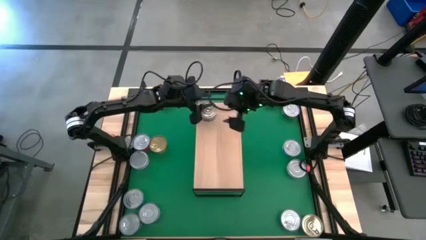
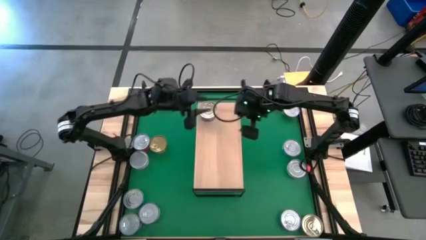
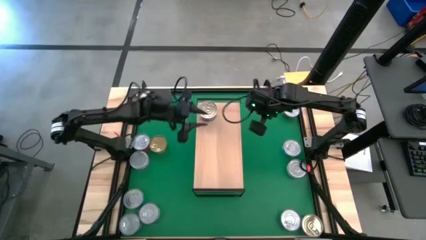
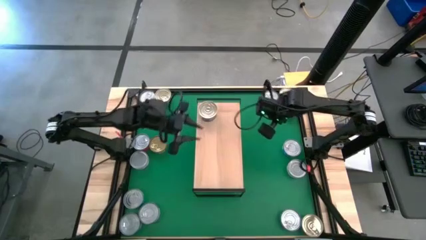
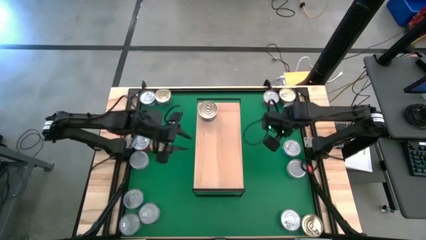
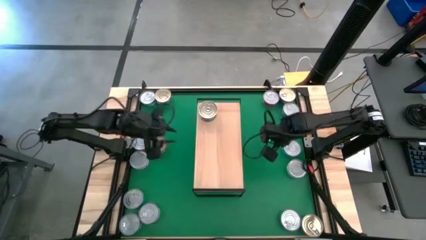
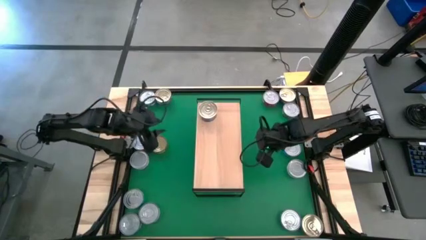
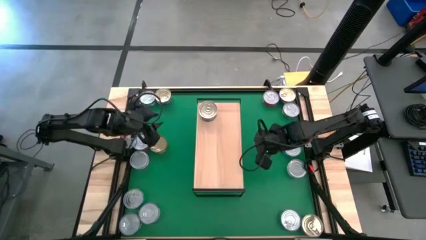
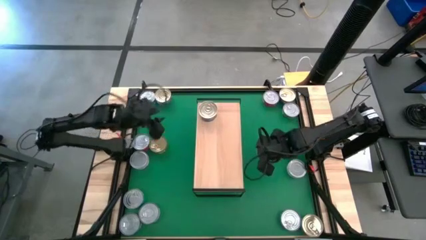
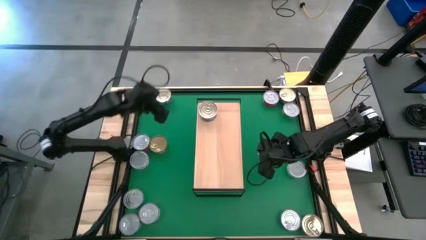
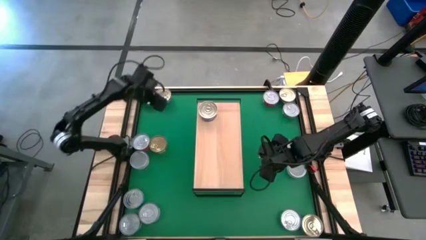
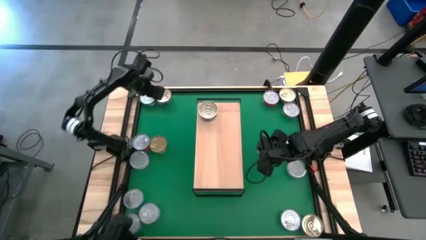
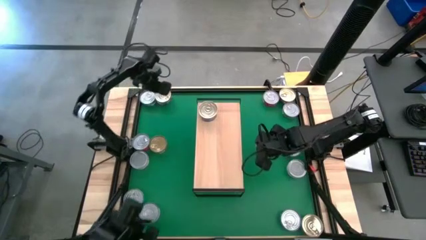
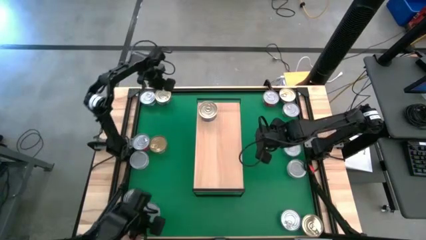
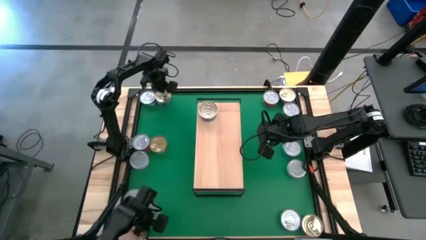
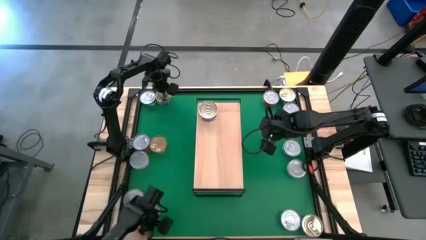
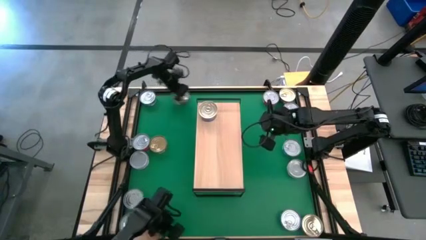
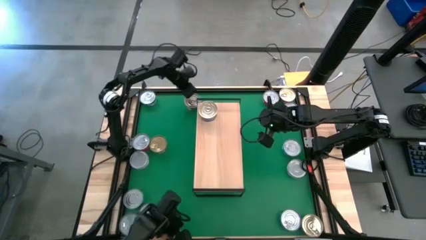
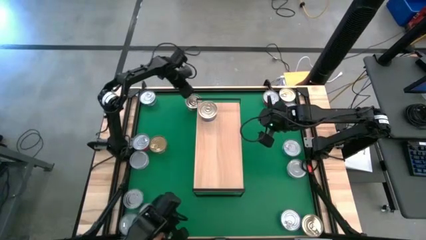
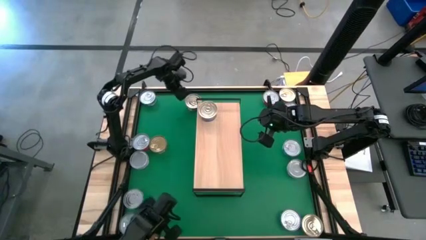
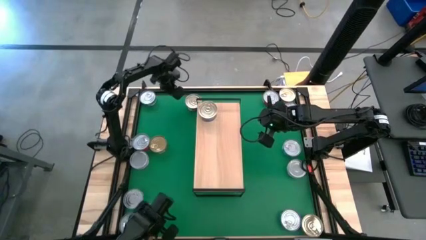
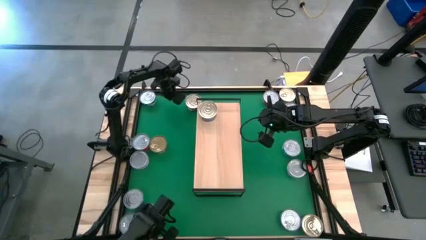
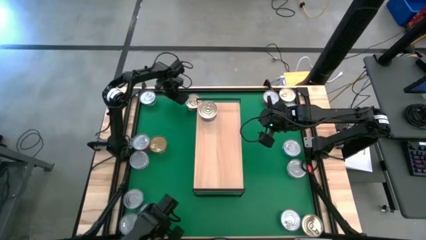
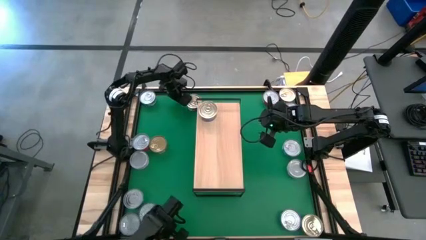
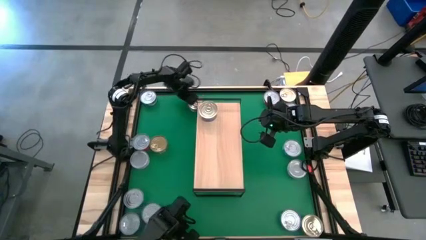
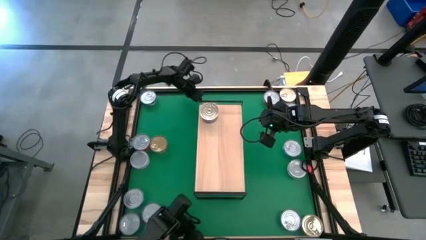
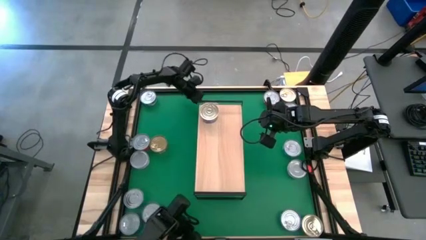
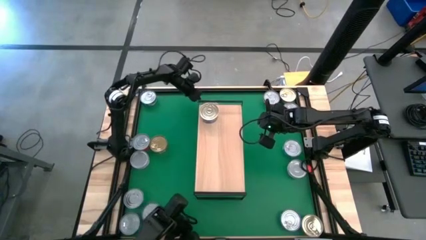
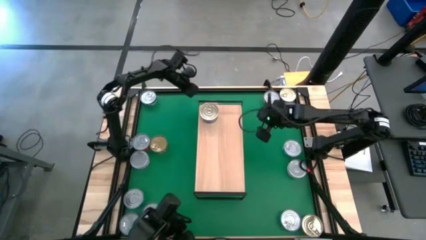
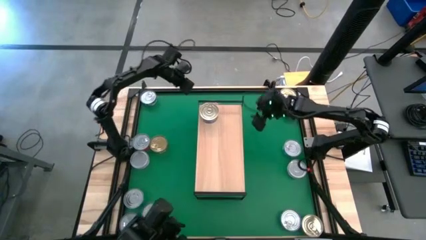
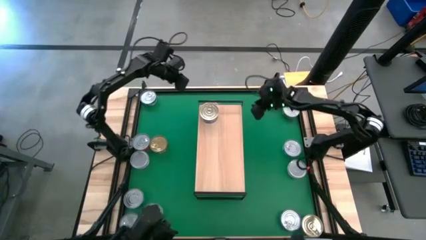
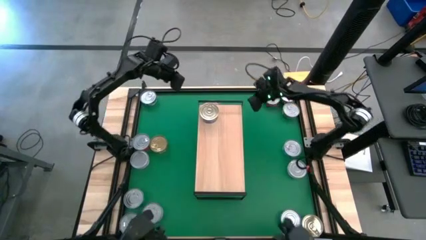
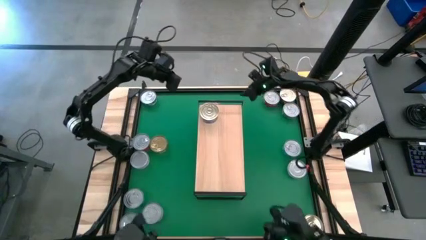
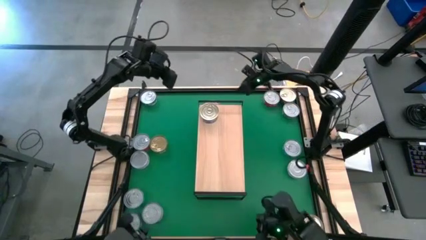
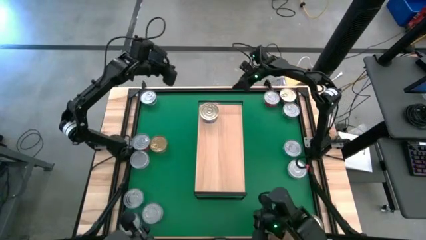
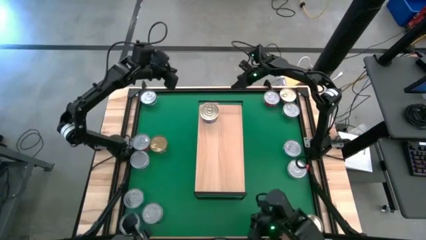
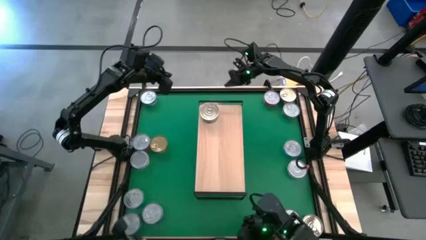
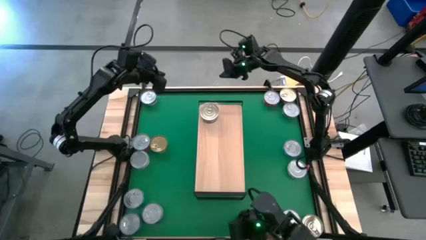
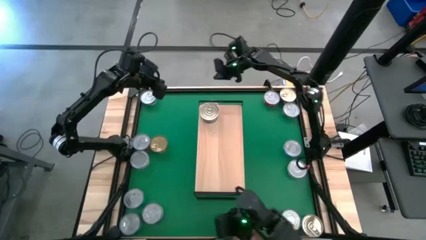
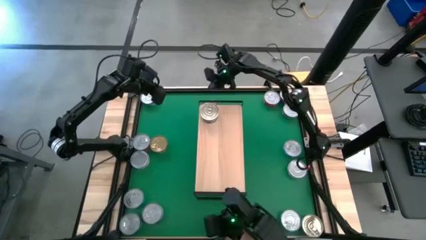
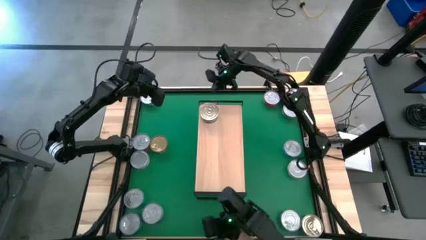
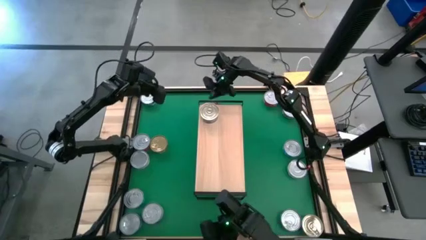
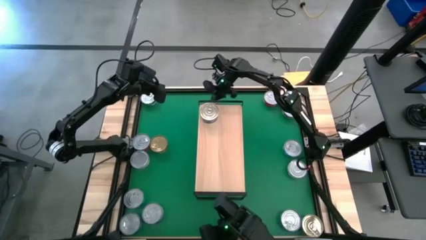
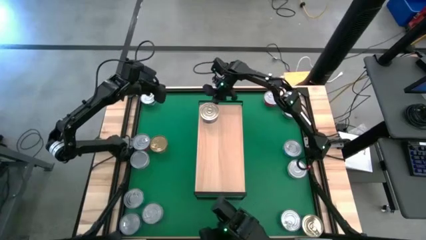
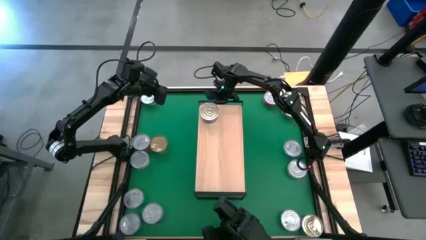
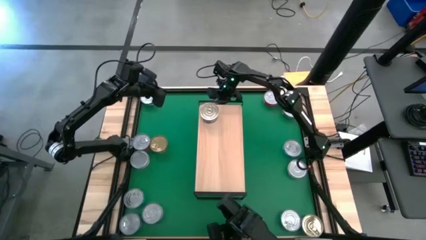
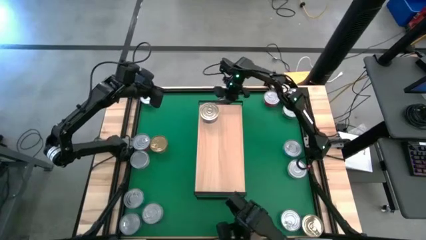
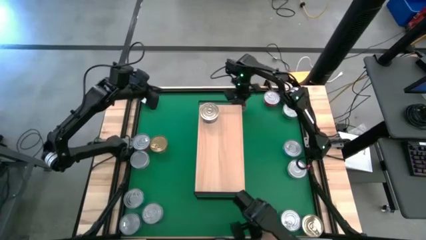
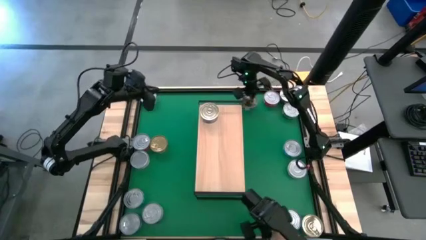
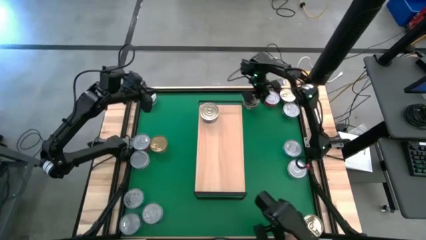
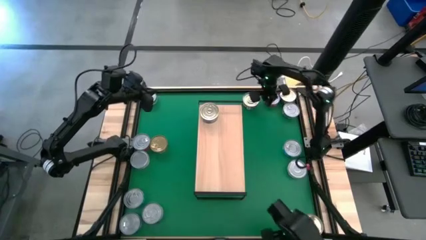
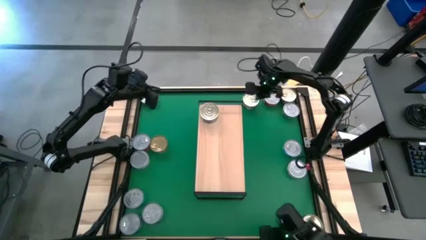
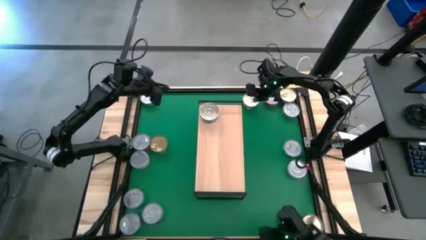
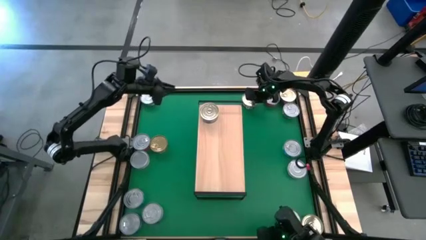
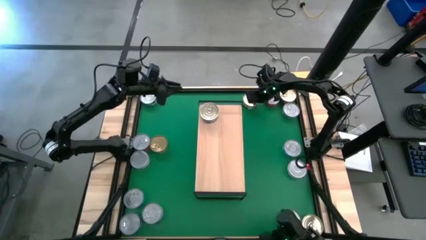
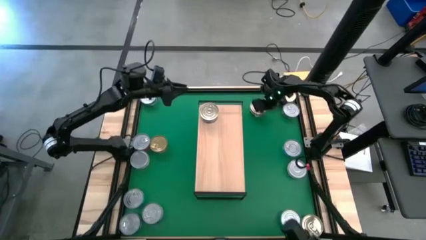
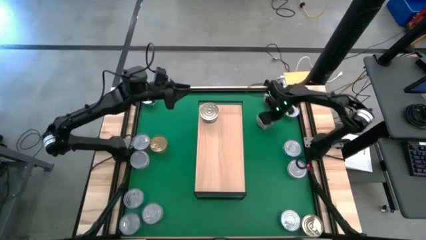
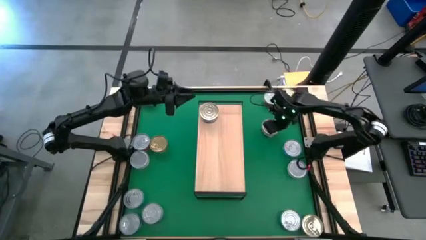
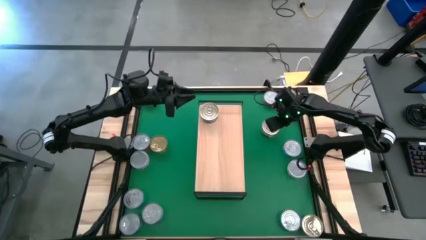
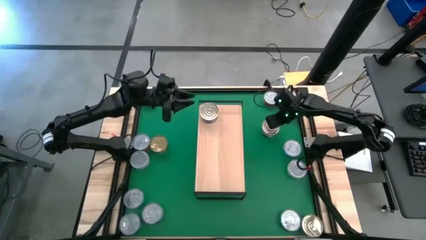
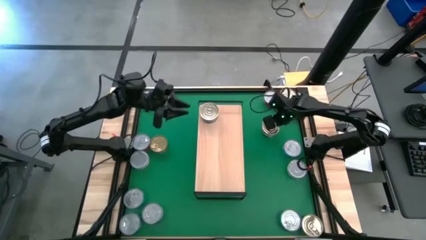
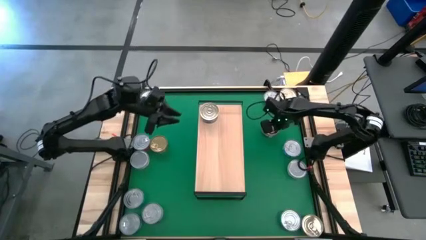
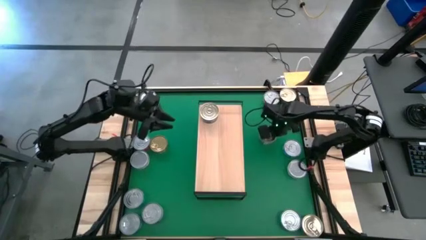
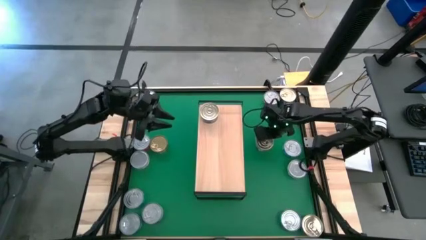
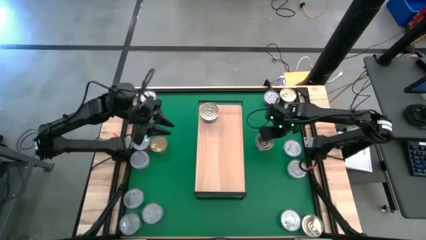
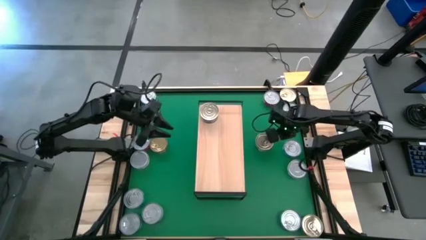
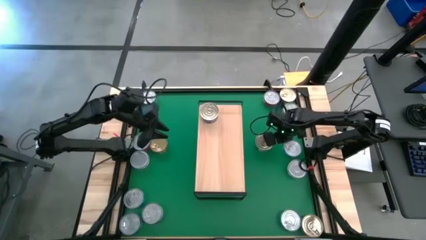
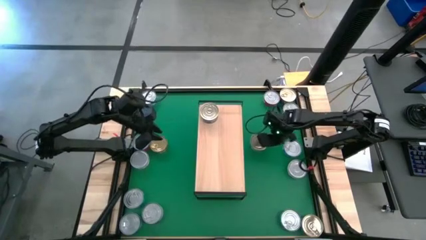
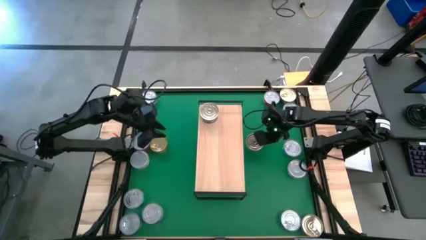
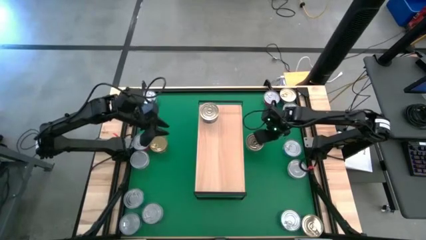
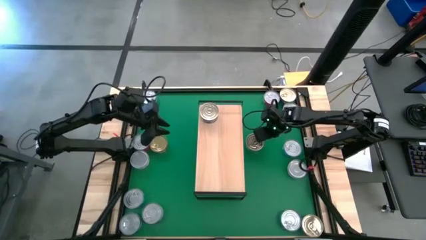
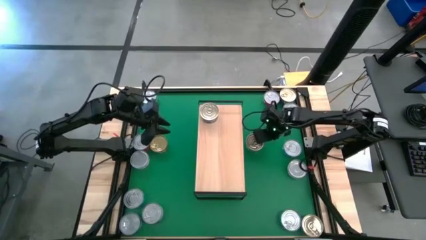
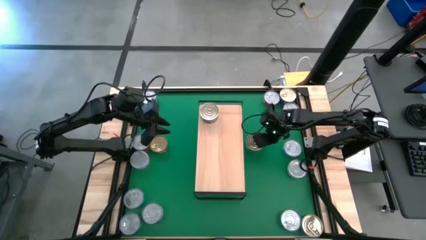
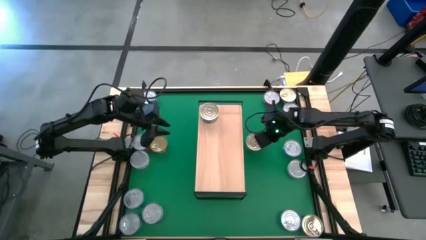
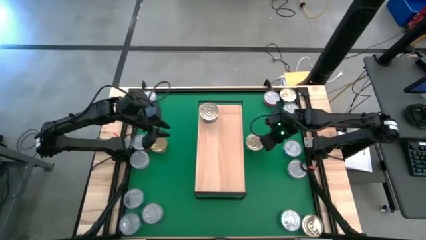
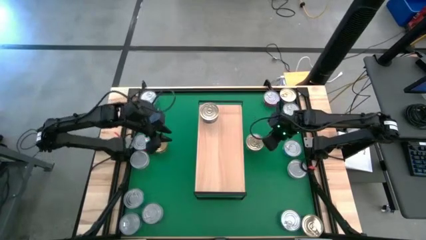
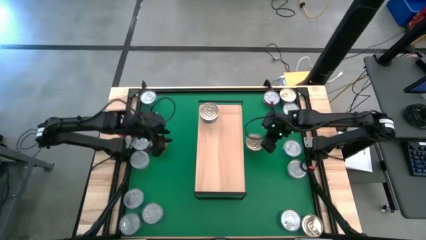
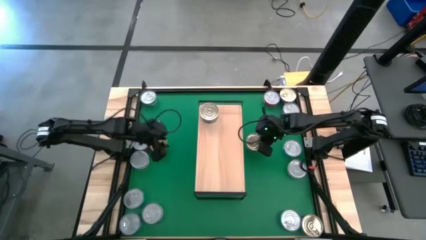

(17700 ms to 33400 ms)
Task: Stack canned seafood by type on shelf
Stack the blue pink tuna can on top of the other blue pink tuna can on the shelf
